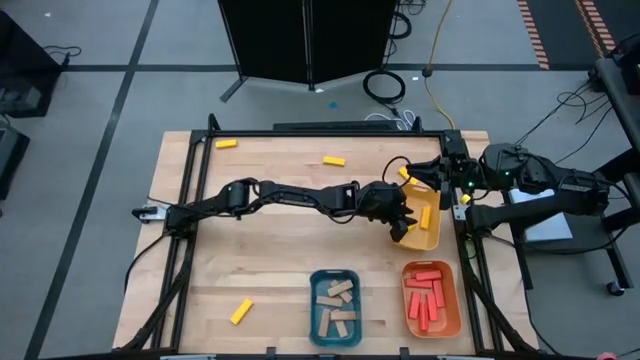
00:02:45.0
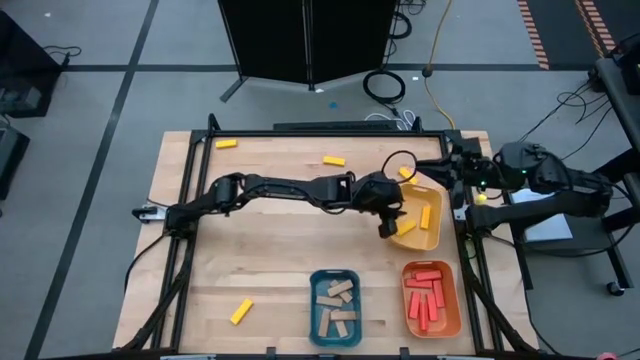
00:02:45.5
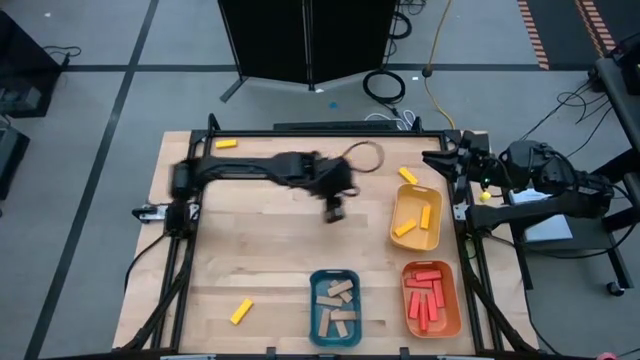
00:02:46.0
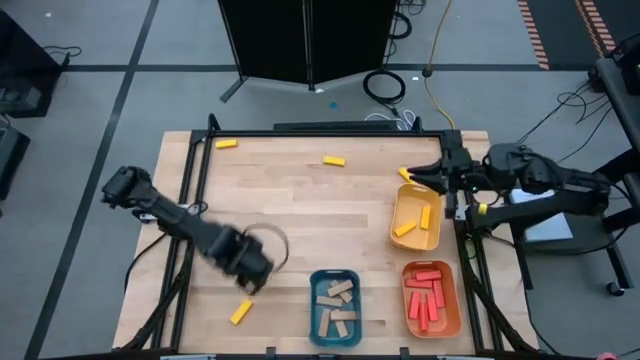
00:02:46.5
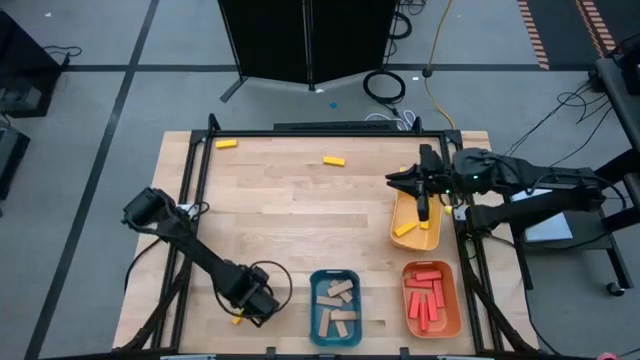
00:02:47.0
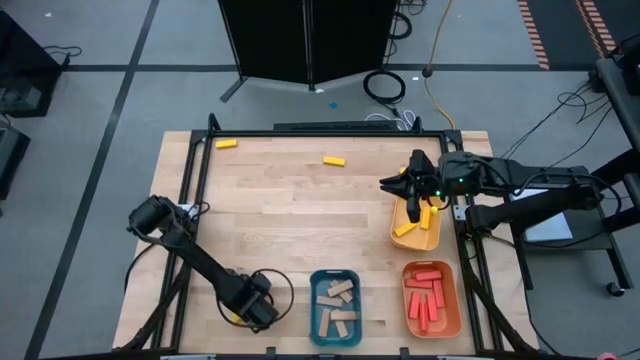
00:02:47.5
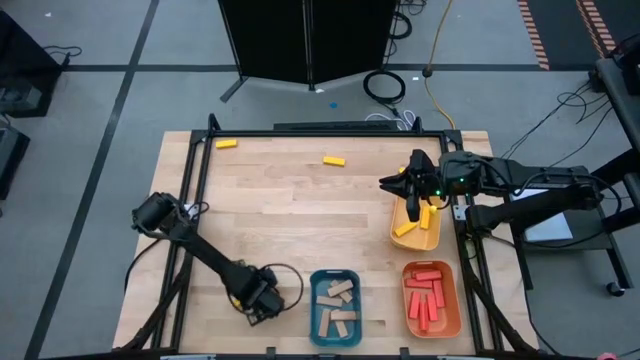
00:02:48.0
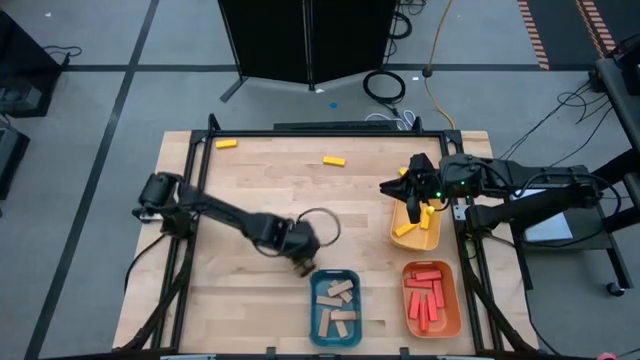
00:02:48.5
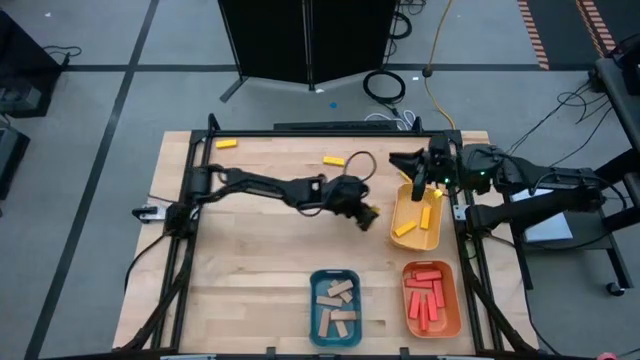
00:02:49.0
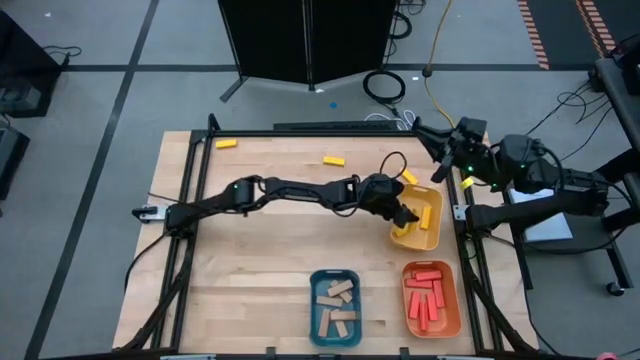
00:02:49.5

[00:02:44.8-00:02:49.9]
Task: Sort blocks
Put the yellow block into the yellow bin

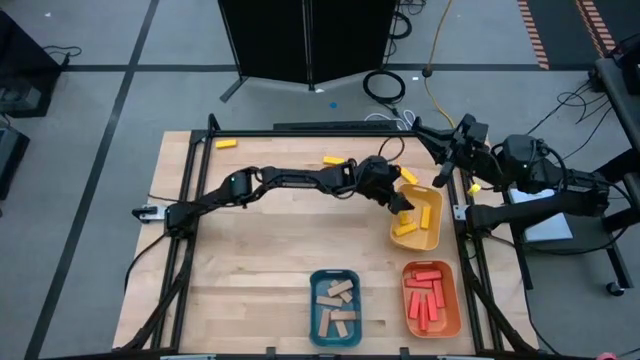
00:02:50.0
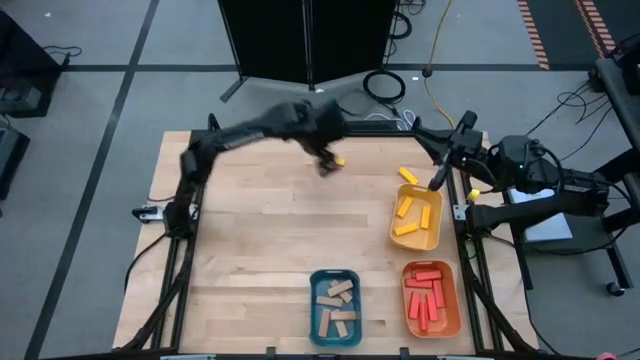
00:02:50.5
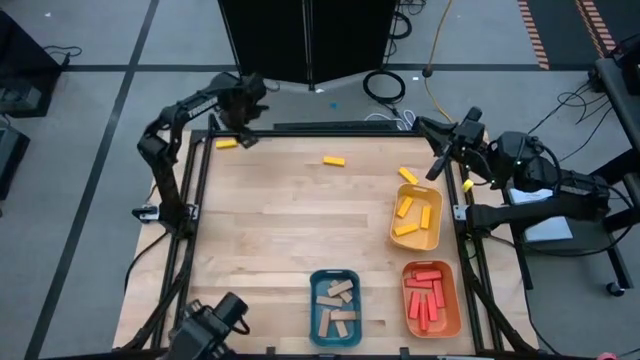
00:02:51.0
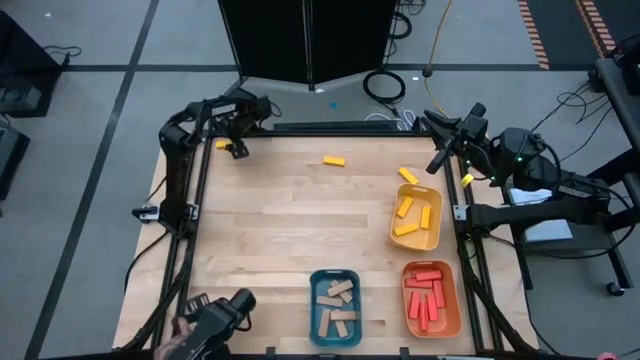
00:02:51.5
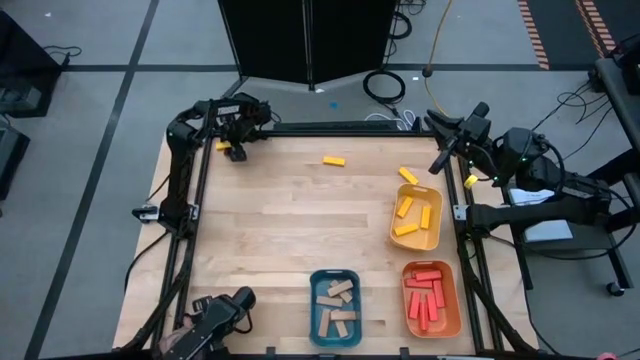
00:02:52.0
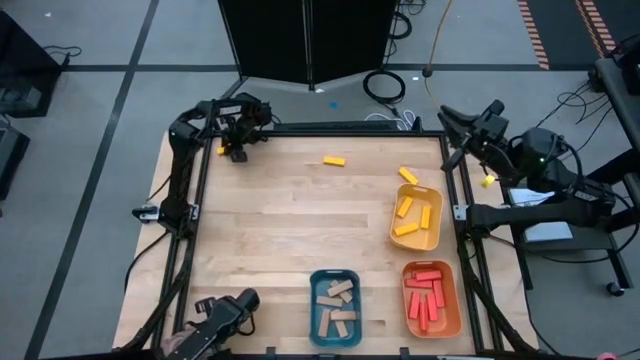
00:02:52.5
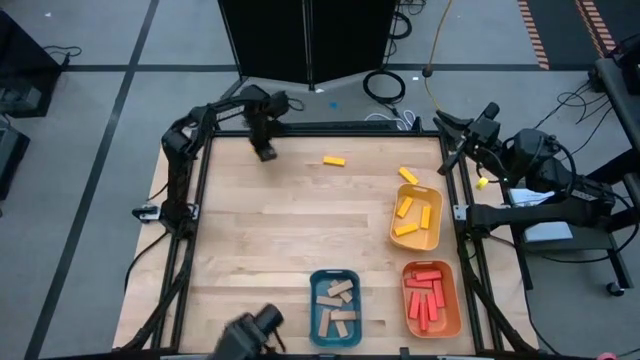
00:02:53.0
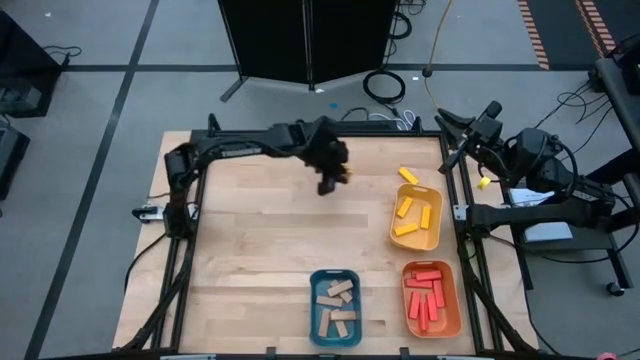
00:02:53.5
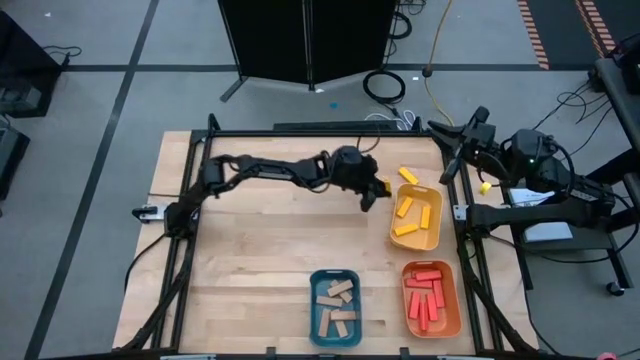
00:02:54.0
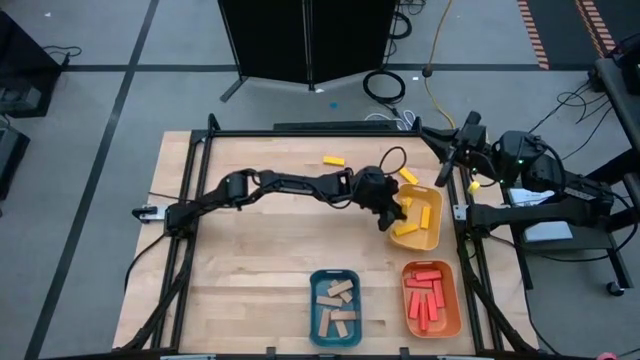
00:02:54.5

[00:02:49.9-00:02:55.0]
Put the yellow block into the yellow bin

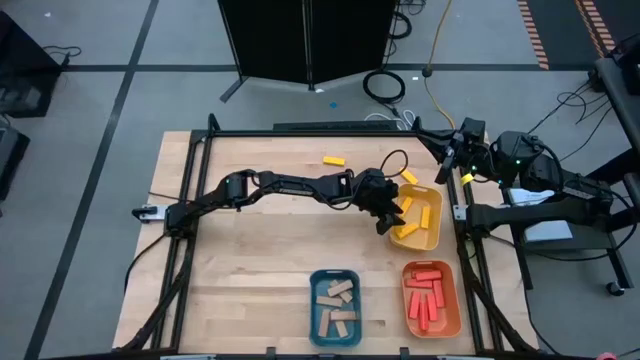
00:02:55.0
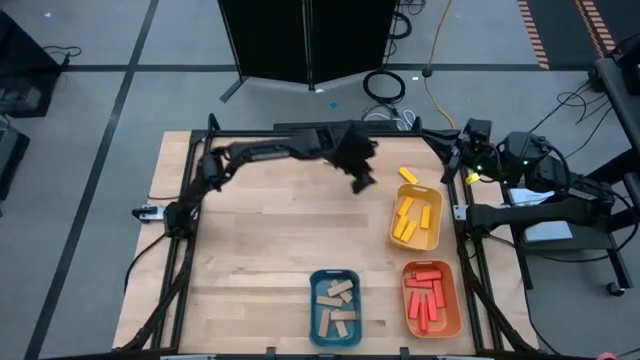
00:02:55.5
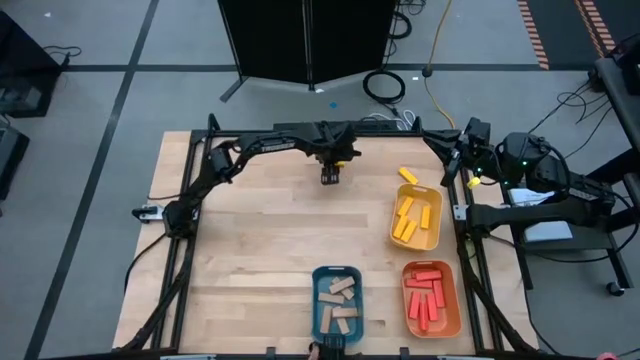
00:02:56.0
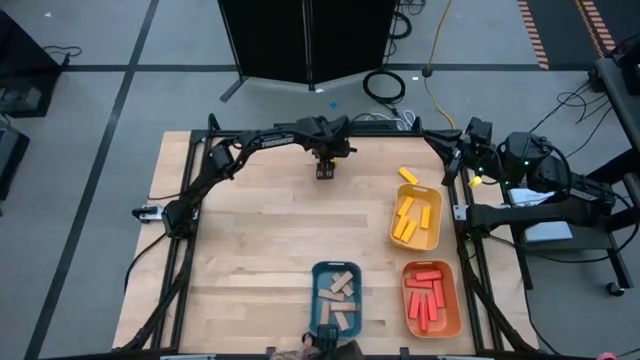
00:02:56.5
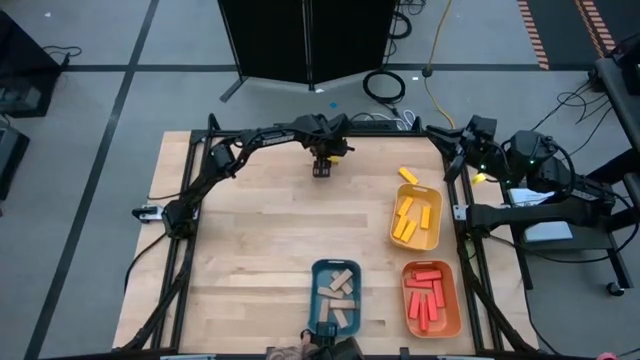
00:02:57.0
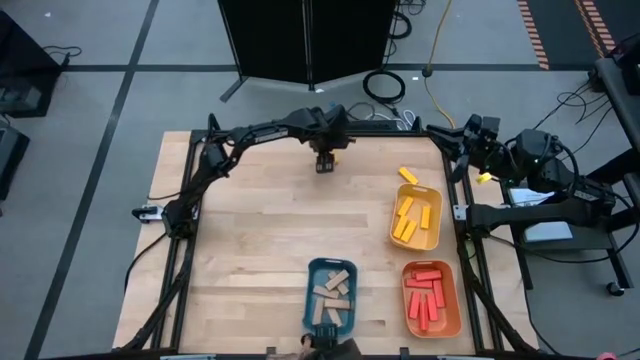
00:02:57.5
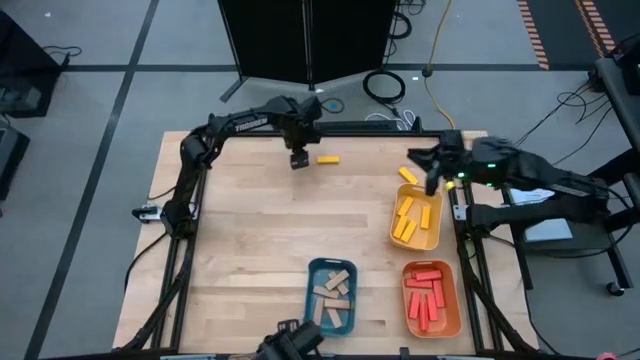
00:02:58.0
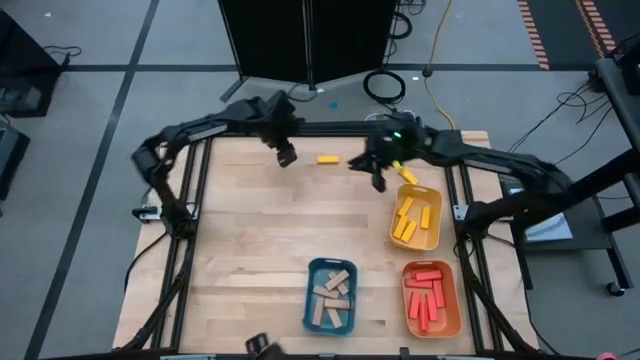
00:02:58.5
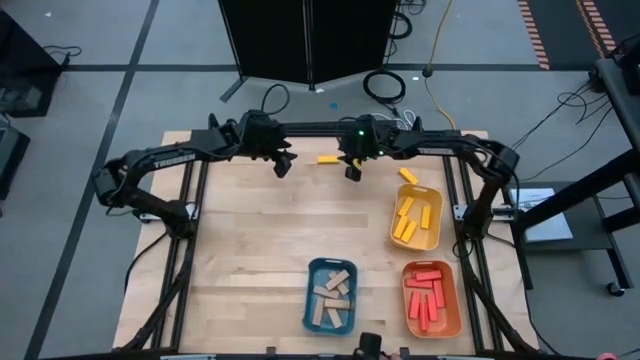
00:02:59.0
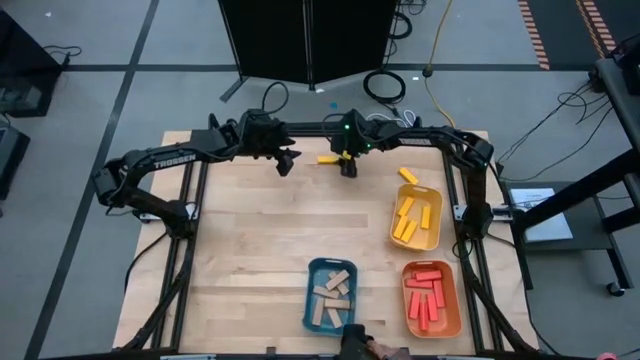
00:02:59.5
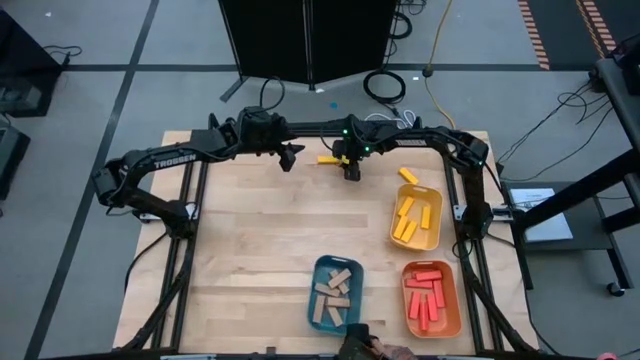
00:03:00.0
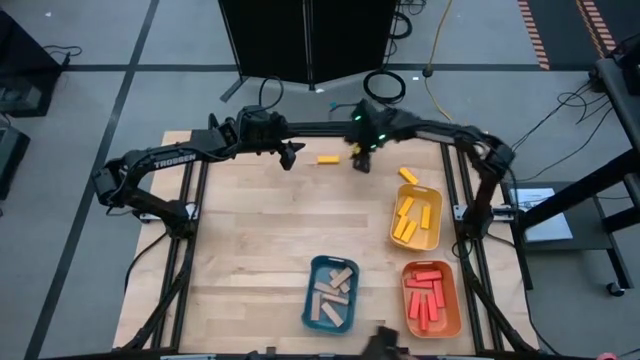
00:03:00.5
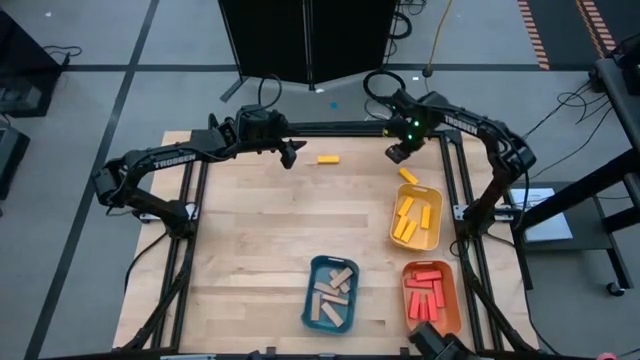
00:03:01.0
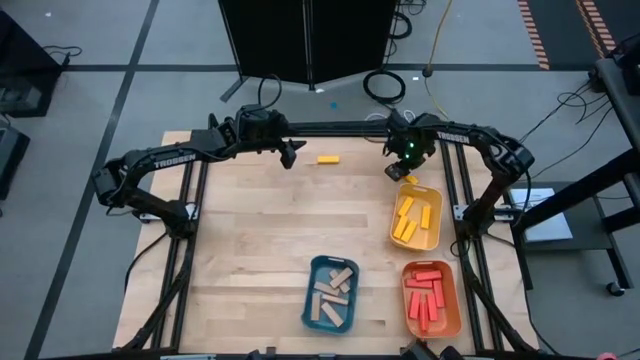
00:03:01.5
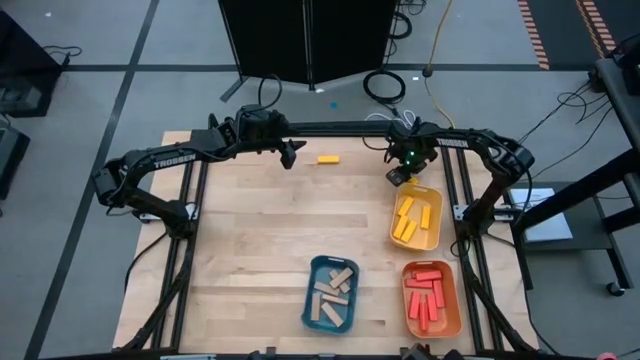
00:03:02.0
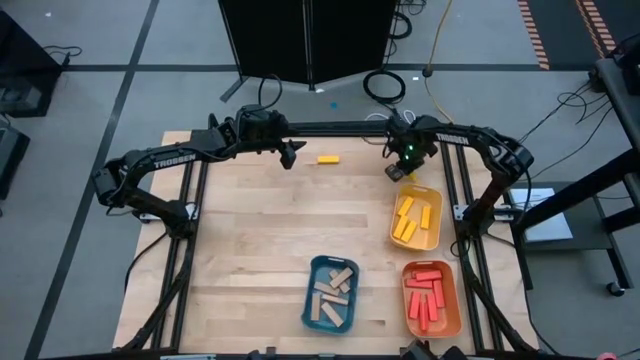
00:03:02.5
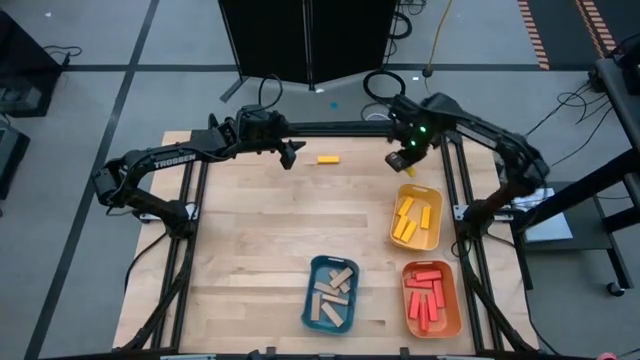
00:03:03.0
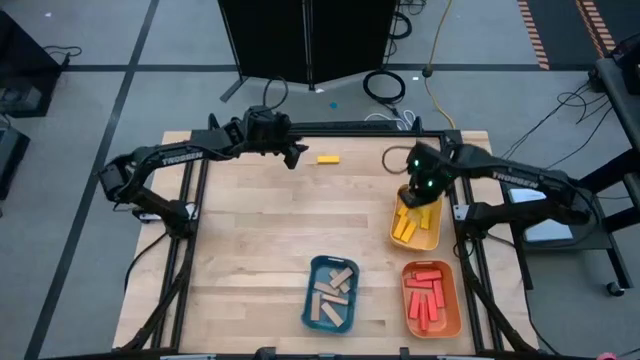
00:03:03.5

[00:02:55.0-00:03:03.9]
Put the yellow block into the yellow bin
